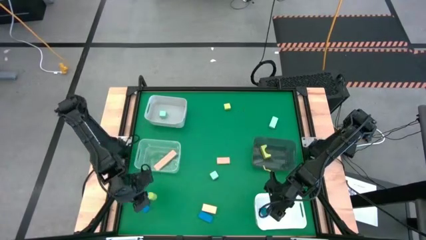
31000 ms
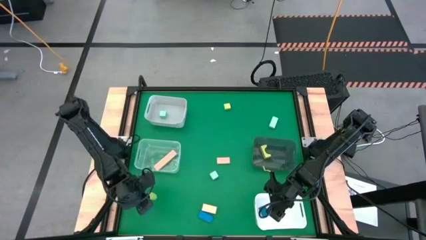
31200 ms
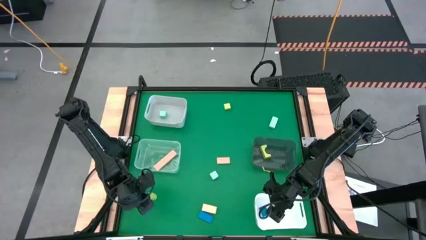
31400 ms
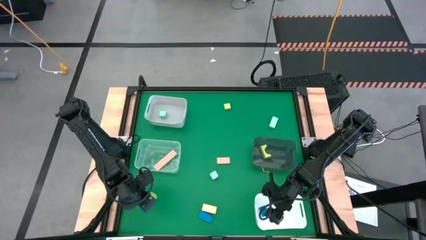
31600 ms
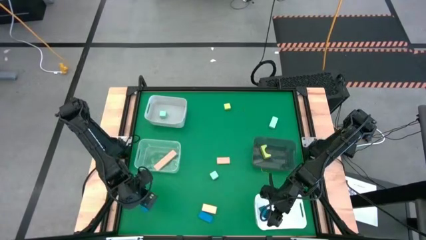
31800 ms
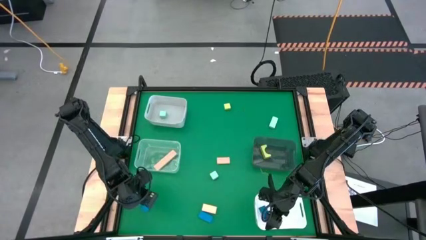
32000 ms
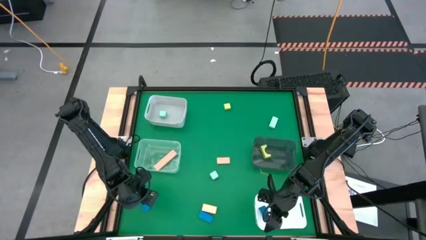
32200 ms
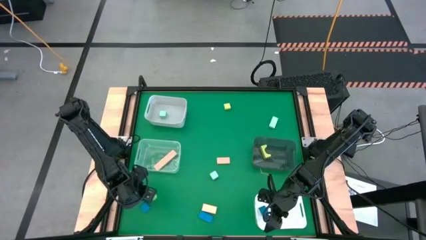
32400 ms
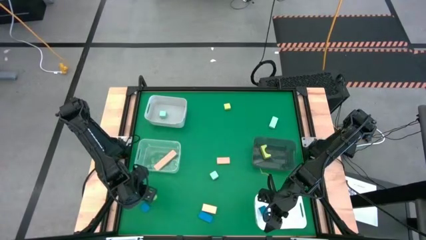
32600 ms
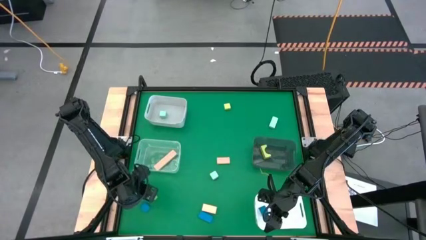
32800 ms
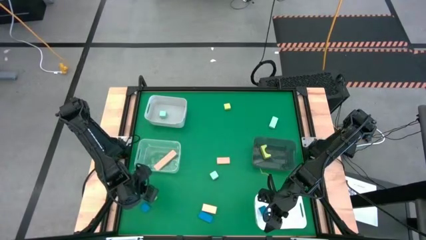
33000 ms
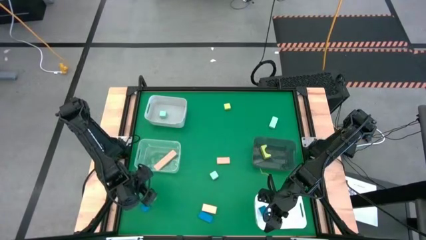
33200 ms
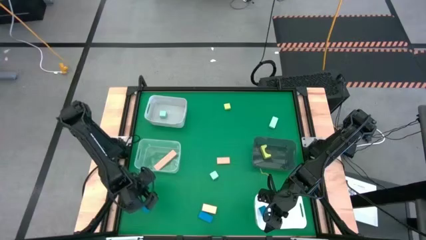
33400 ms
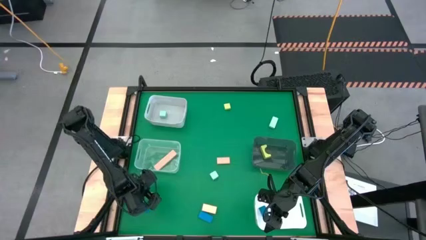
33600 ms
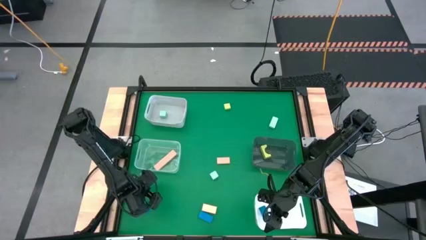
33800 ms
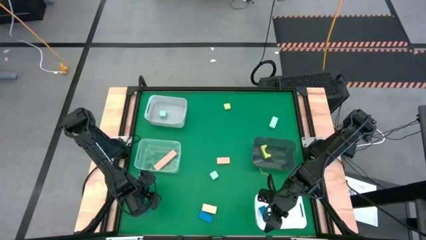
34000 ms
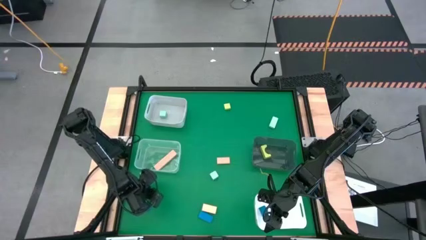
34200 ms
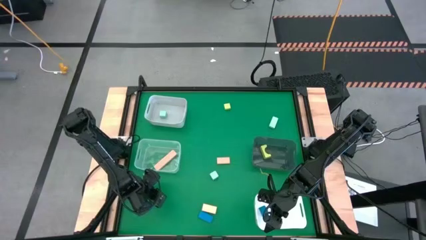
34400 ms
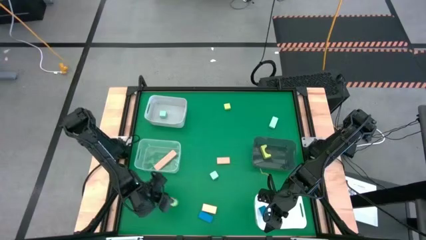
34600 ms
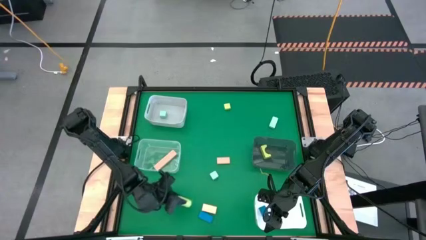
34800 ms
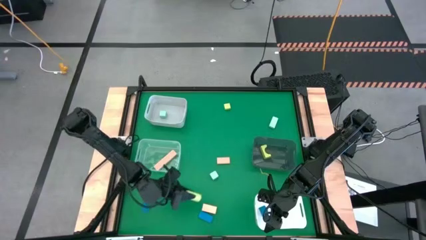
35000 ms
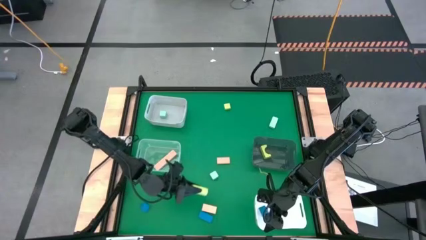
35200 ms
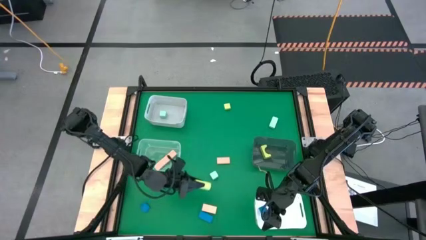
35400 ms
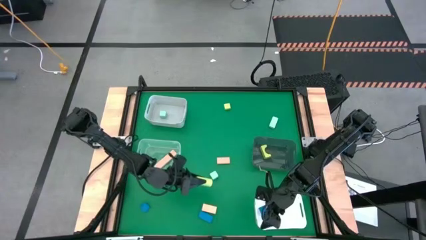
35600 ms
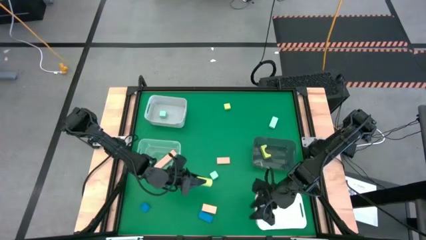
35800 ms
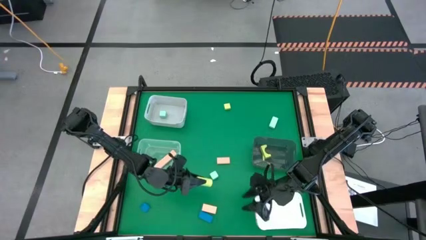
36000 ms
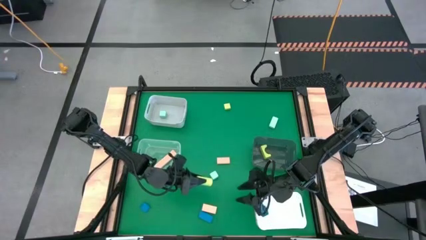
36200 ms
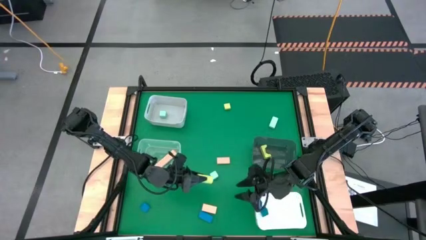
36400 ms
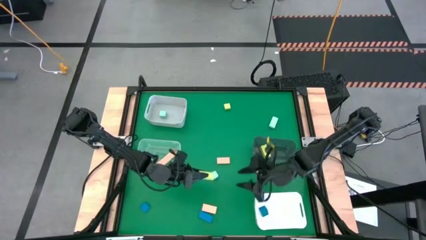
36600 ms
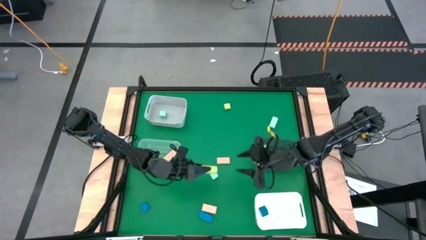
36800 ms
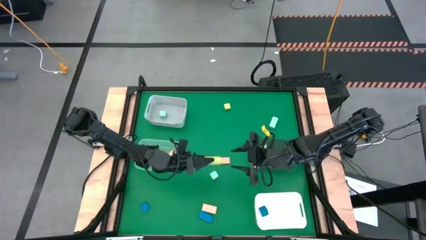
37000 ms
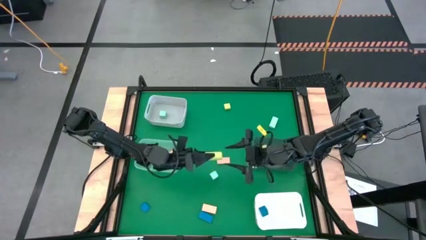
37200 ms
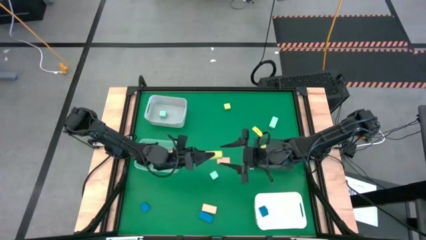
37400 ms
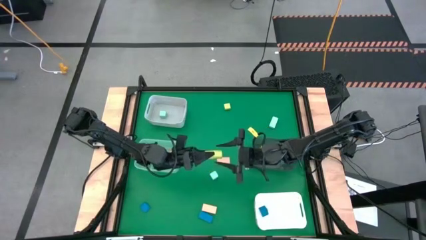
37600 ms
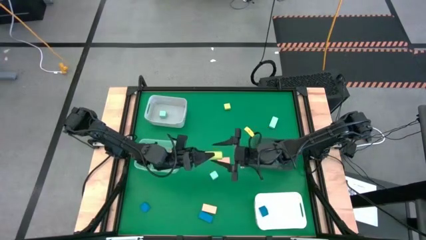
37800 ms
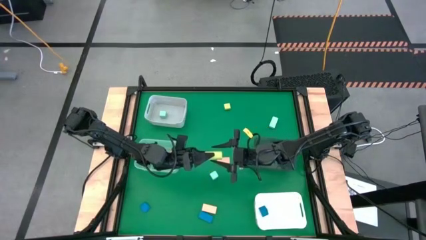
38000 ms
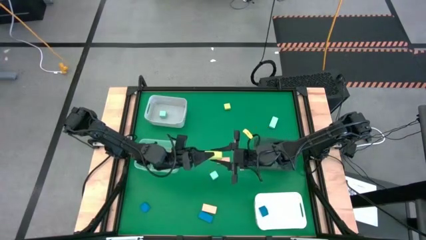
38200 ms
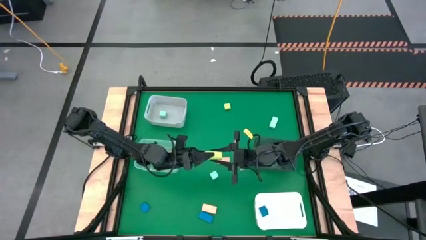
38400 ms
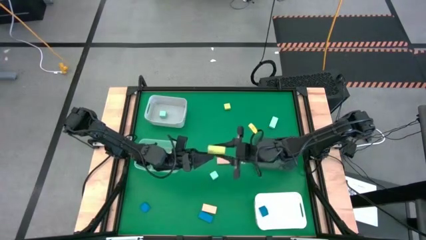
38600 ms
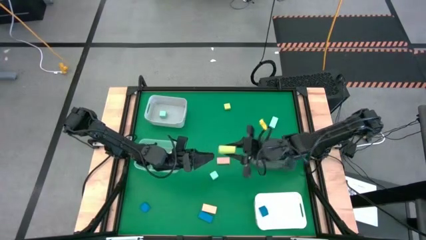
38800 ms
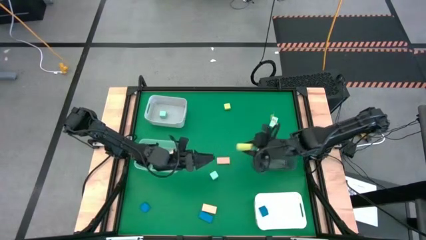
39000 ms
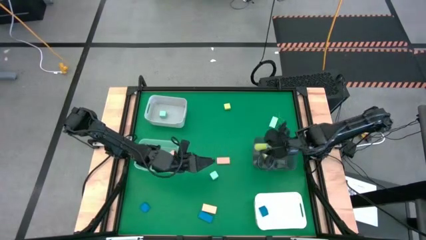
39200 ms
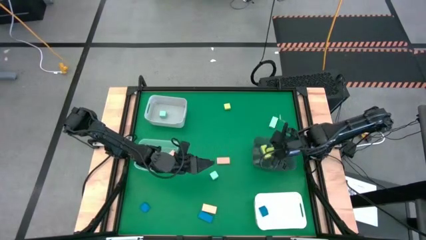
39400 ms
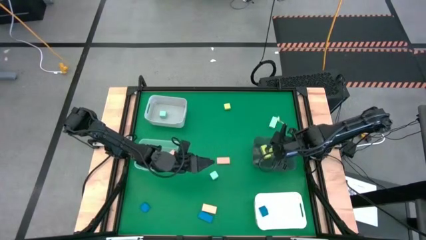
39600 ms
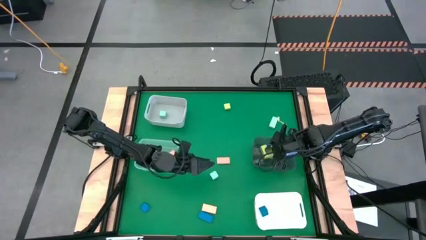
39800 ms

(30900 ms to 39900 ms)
Task: Sort & place blocks by color
Put the bottom green block into the black bin

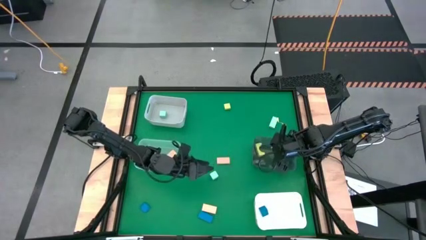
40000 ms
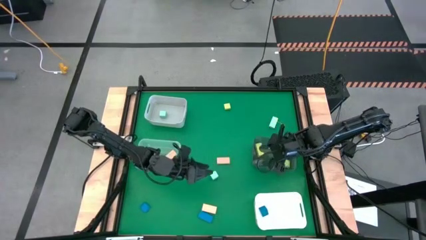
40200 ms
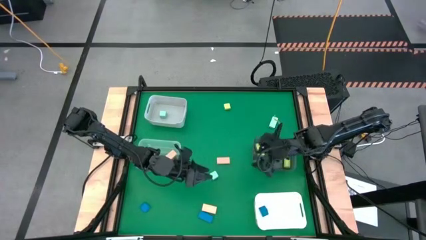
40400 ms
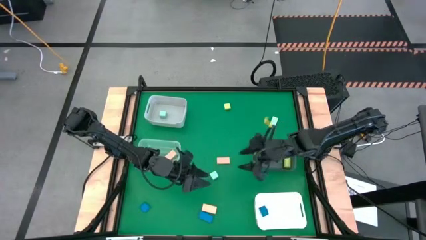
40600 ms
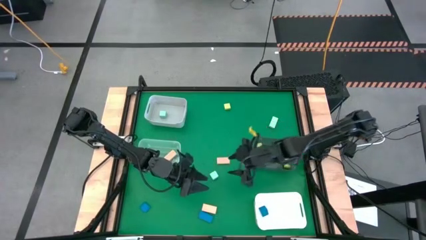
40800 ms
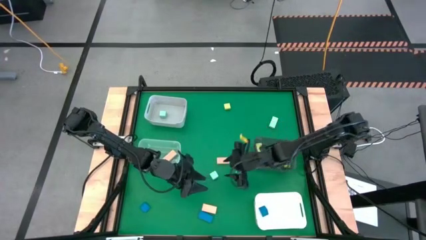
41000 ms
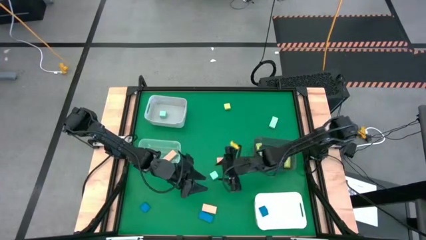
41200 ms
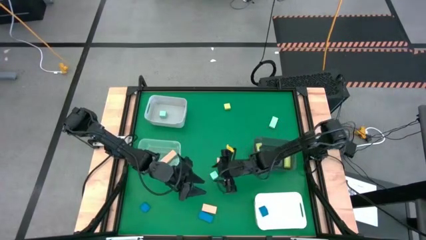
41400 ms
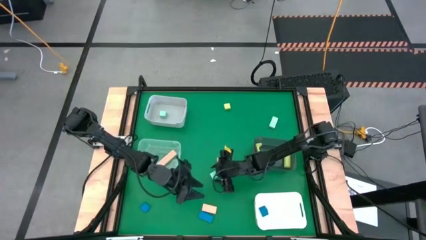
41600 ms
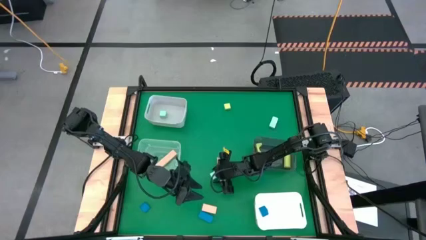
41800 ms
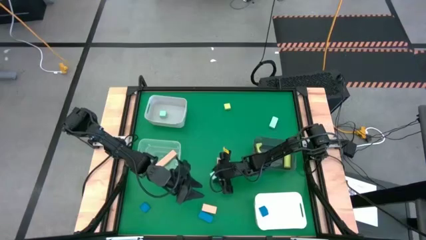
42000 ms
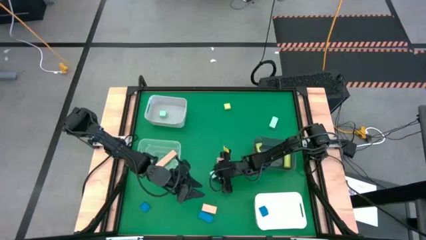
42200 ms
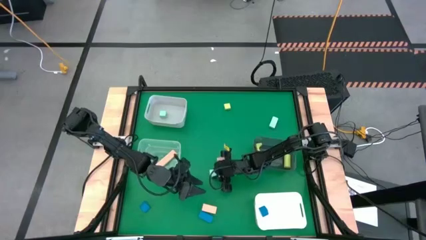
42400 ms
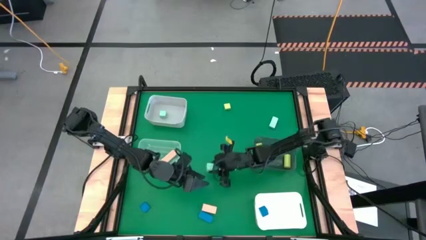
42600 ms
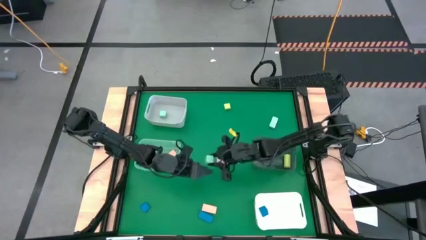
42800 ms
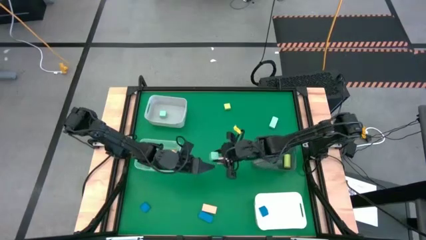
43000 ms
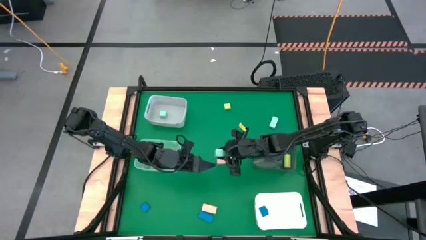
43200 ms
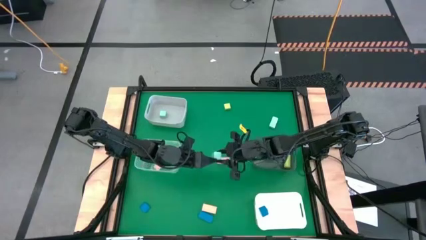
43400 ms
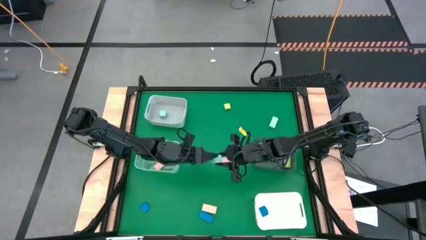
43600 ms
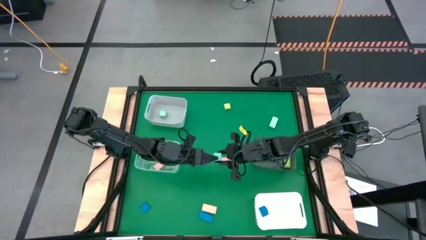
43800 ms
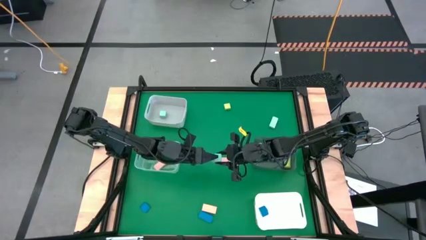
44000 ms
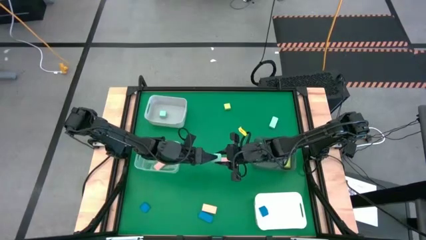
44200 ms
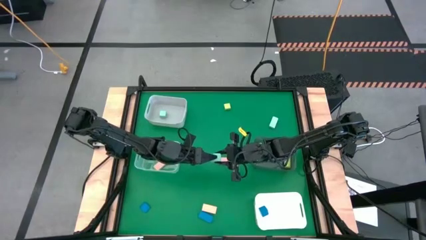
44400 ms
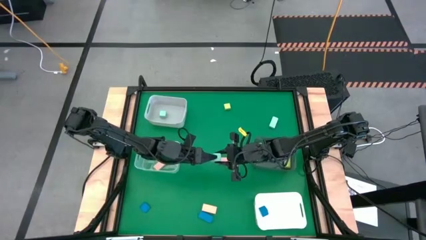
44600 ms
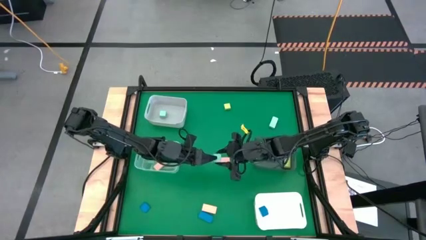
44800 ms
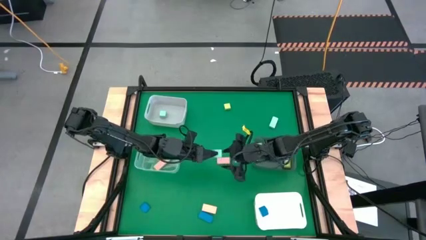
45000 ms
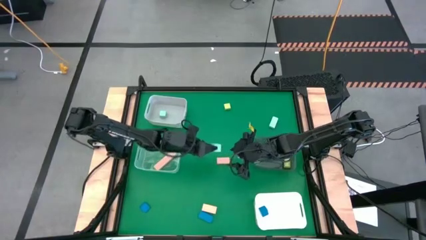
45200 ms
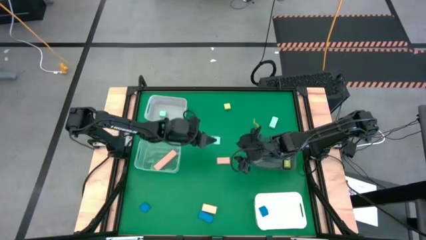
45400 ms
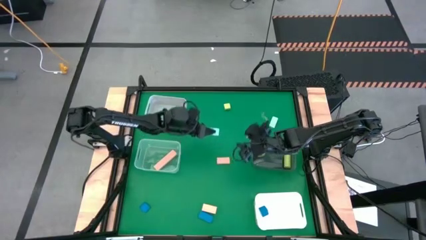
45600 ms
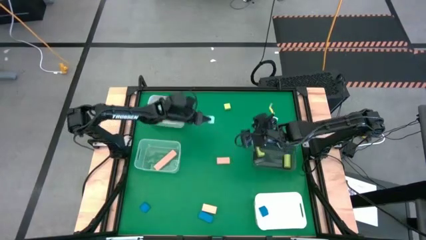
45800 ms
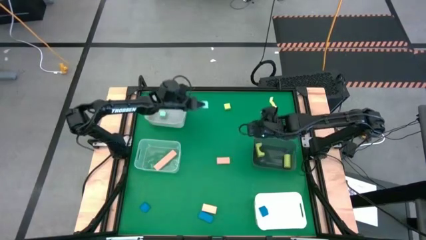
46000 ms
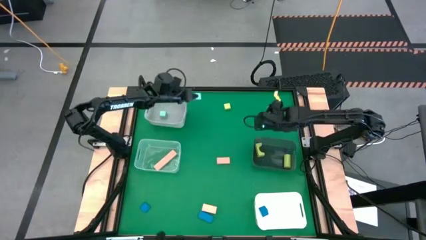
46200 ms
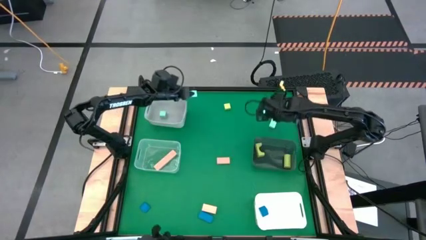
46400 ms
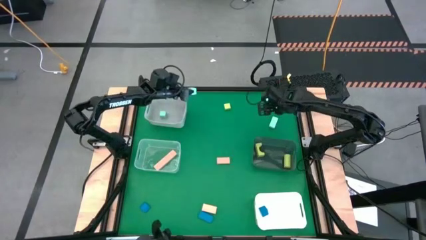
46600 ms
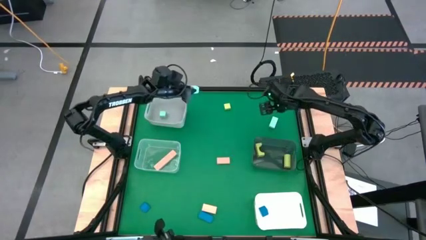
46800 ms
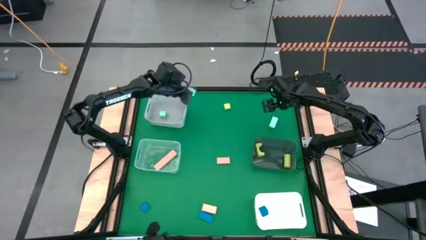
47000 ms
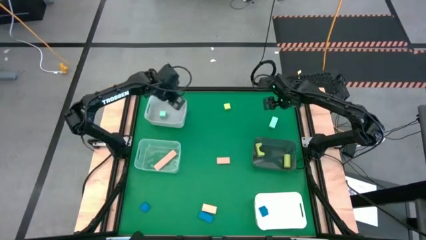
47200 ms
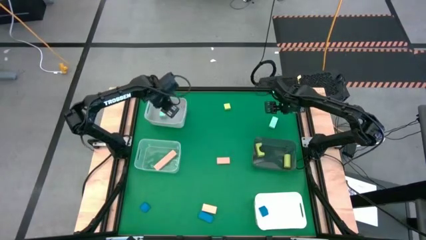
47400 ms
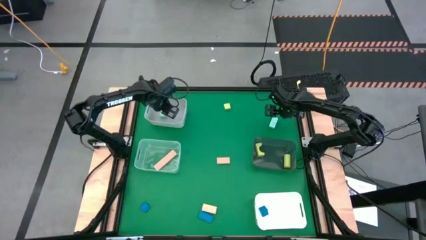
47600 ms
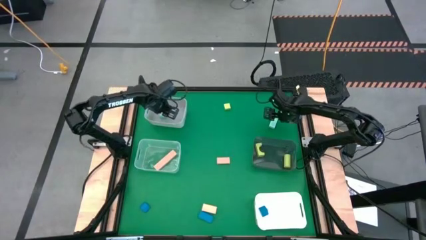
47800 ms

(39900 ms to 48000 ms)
Put the bottom light blue block into the gray bin

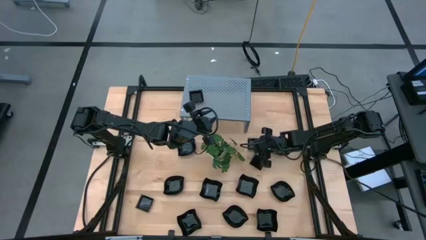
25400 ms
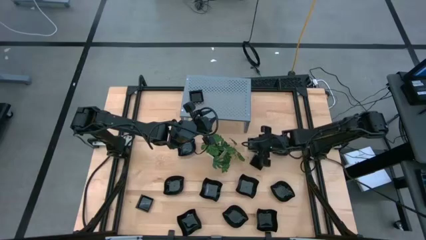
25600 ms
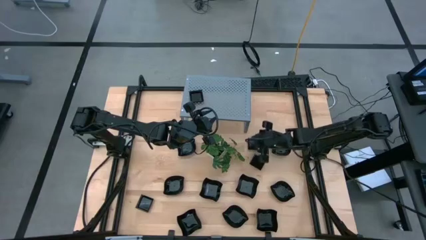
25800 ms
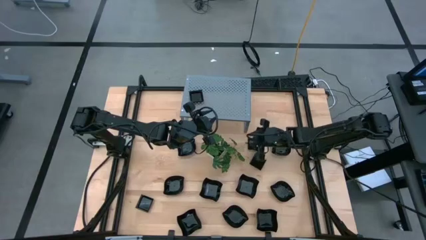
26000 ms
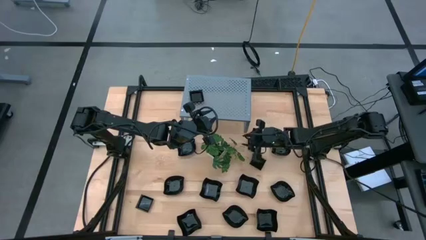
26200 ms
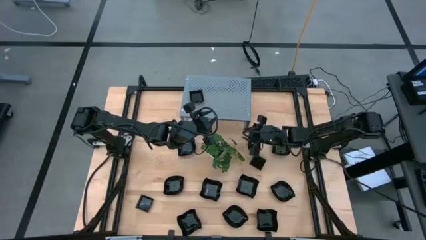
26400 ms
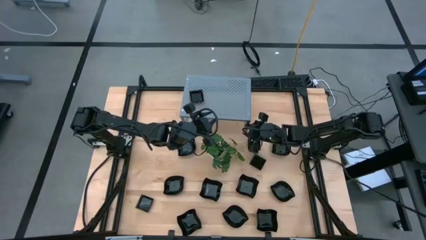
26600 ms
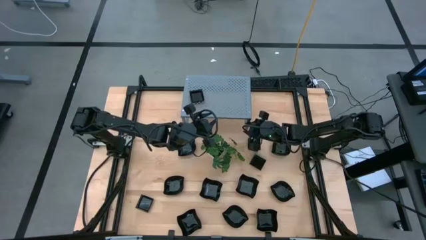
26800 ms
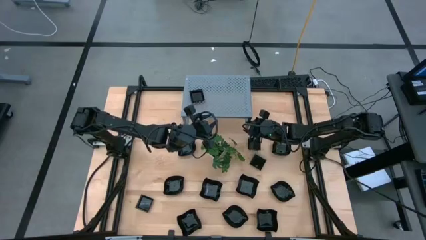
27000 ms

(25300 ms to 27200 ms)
Task: Pick & Place Mini shaped plates
Adjust the shelf
